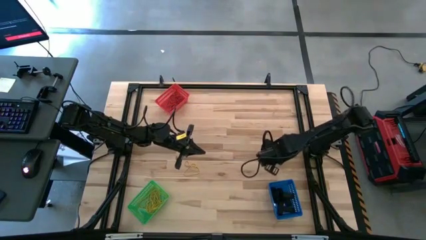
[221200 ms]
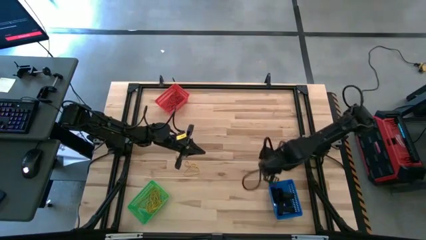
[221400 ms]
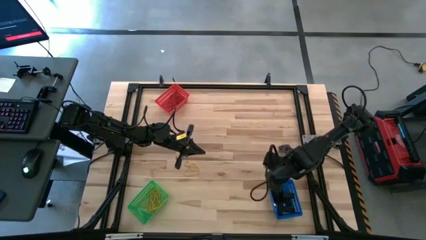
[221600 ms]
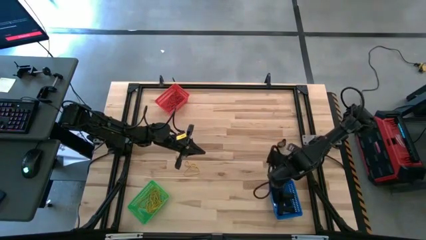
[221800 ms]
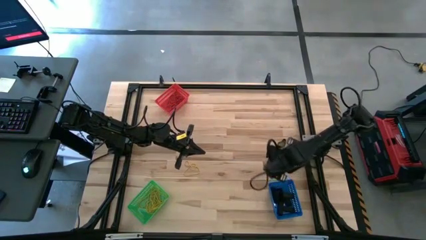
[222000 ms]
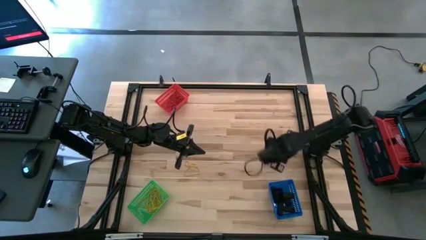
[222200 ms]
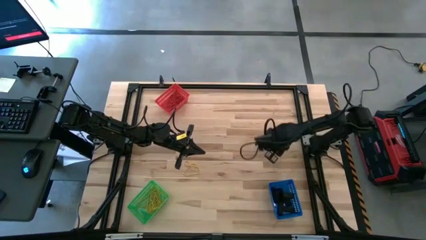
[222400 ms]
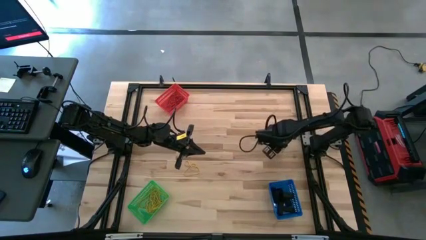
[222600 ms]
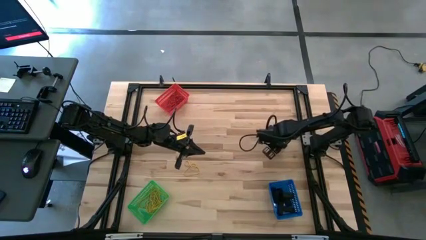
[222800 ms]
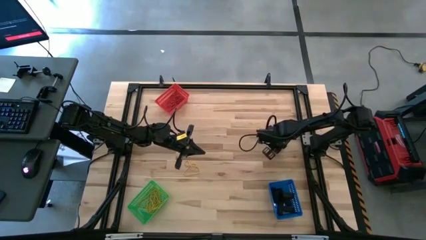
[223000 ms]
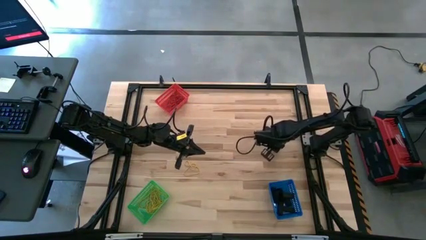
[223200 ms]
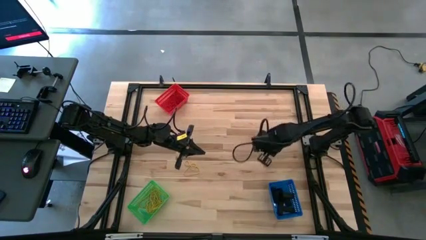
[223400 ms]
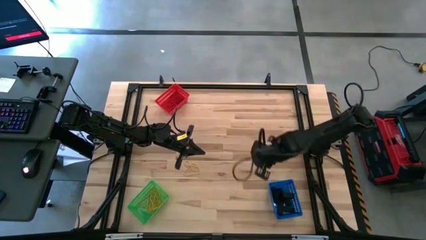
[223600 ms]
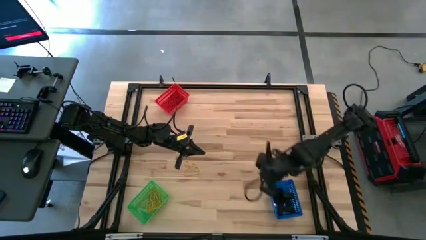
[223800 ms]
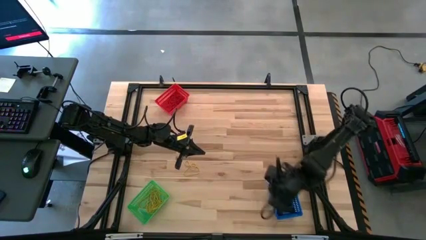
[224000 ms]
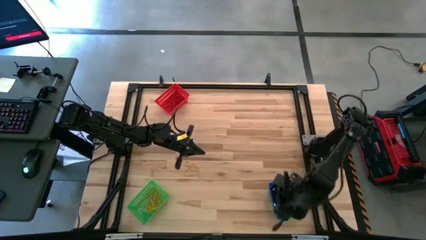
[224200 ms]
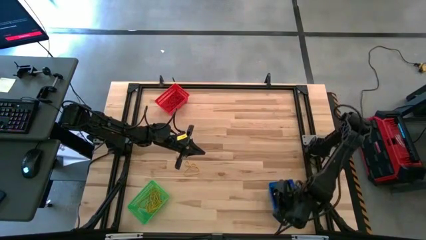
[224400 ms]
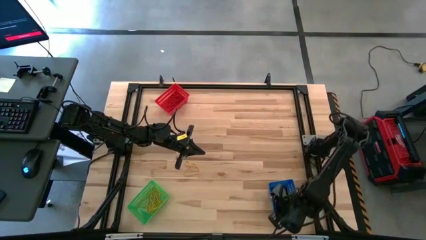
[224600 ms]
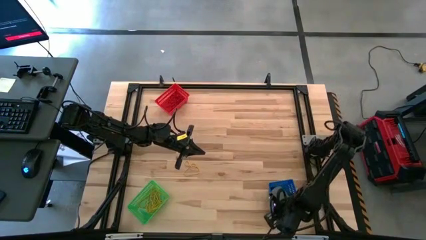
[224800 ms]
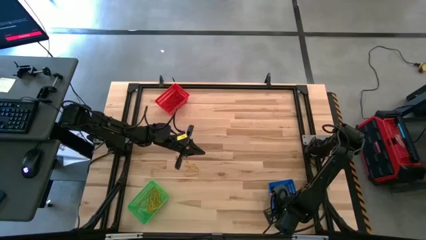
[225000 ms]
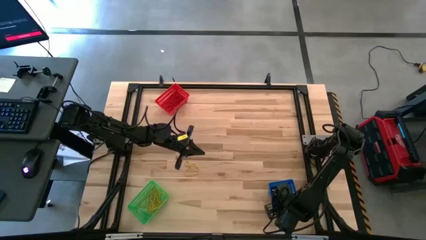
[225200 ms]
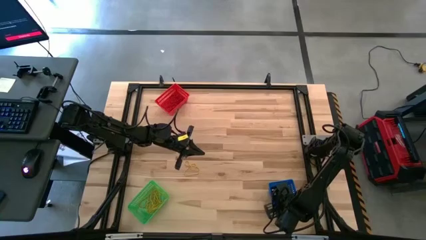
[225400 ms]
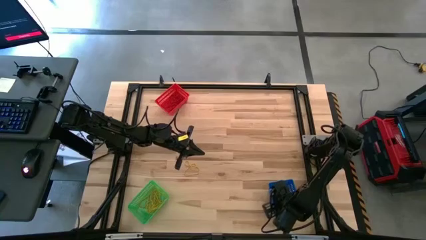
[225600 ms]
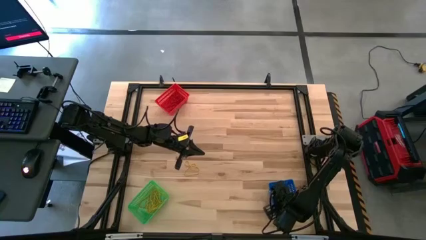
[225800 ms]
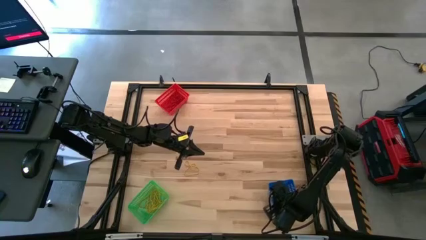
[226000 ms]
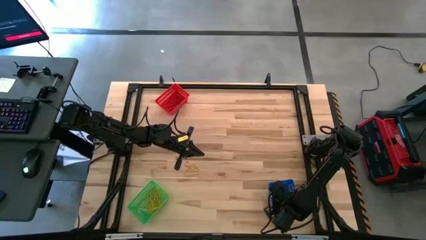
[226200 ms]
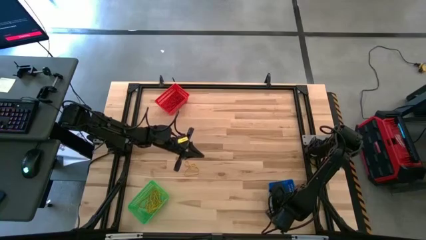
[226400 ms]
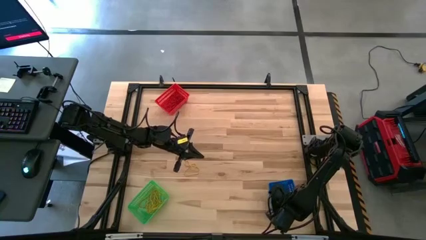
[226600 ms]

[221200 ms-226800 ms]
Task: Sort rubber bands into baskets
Put the black rubber band into the blue basket

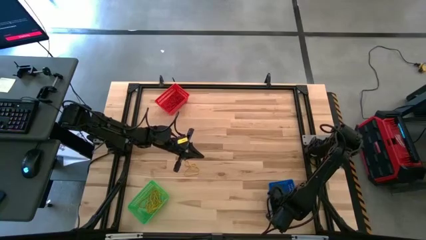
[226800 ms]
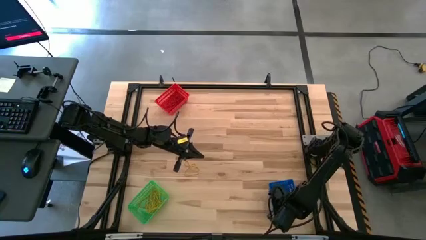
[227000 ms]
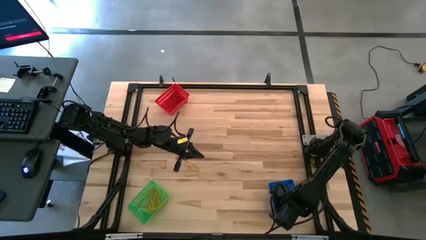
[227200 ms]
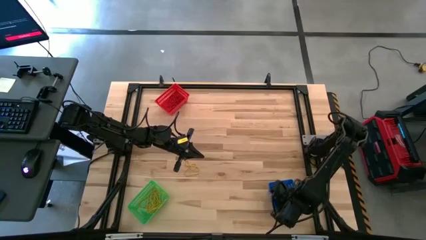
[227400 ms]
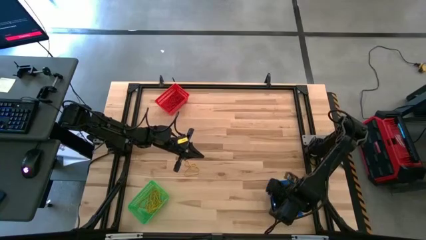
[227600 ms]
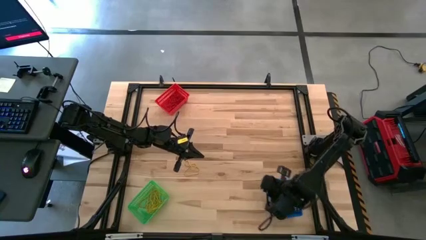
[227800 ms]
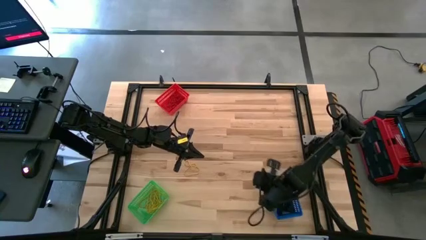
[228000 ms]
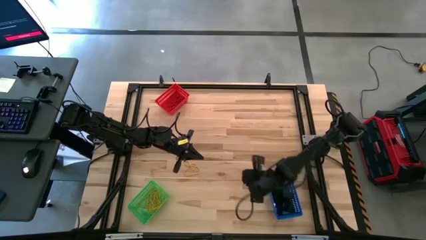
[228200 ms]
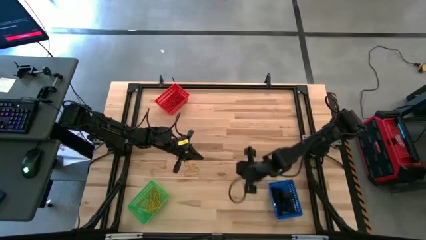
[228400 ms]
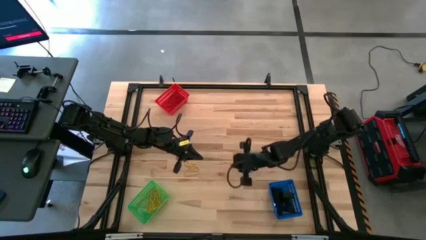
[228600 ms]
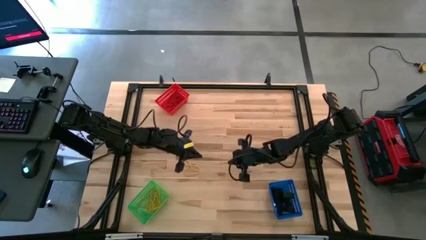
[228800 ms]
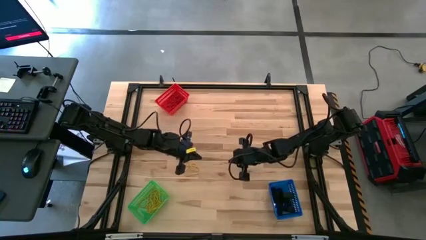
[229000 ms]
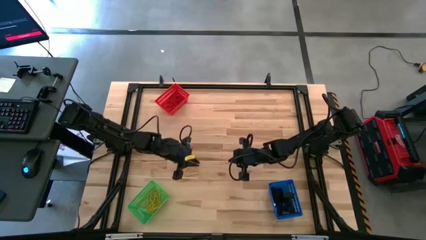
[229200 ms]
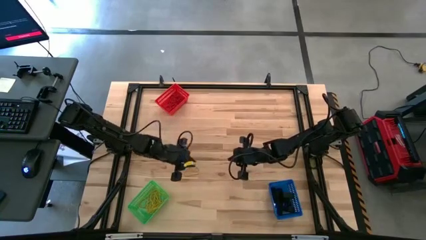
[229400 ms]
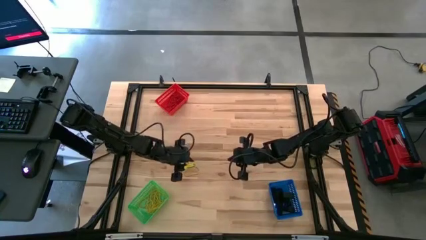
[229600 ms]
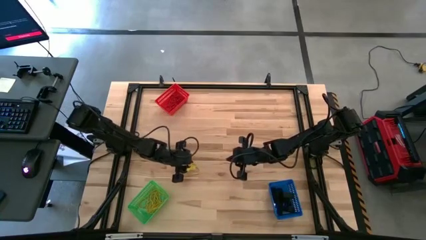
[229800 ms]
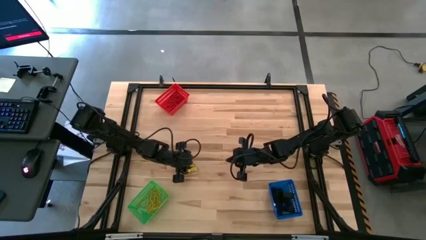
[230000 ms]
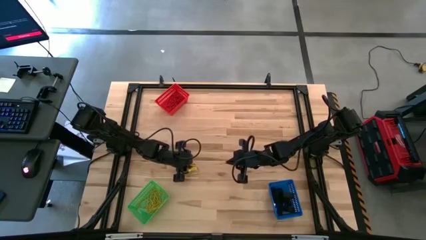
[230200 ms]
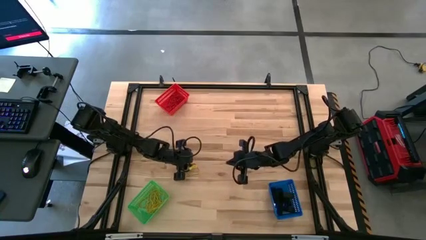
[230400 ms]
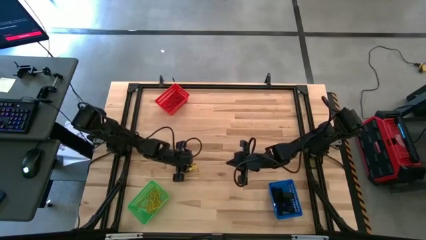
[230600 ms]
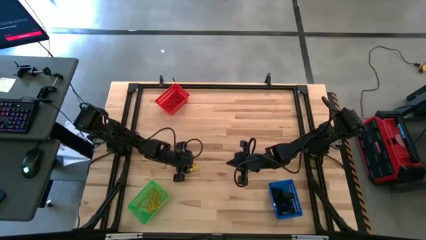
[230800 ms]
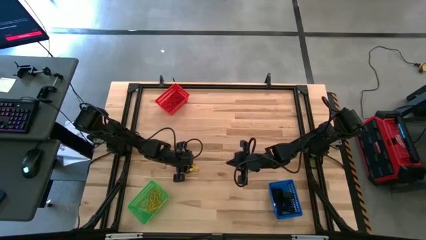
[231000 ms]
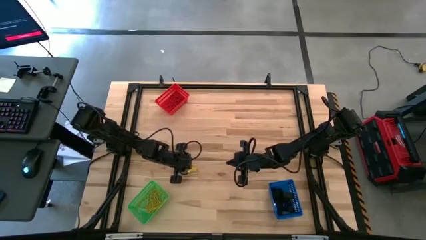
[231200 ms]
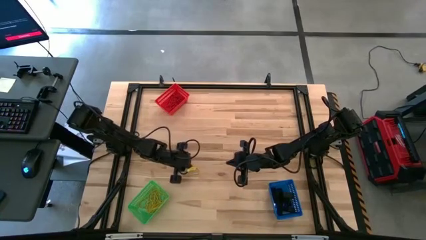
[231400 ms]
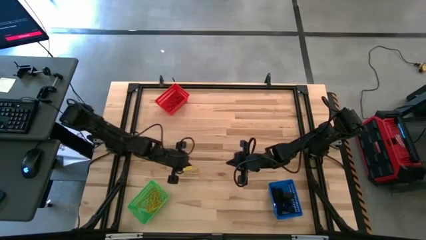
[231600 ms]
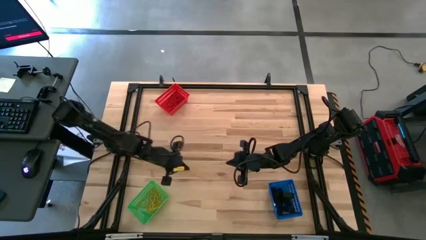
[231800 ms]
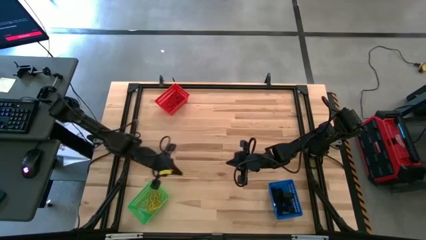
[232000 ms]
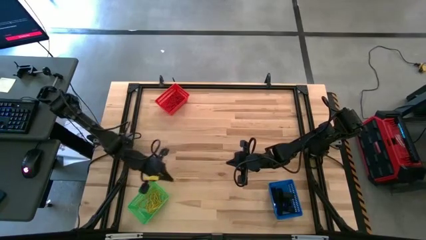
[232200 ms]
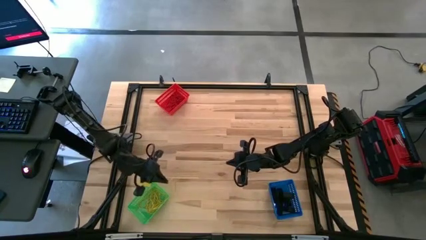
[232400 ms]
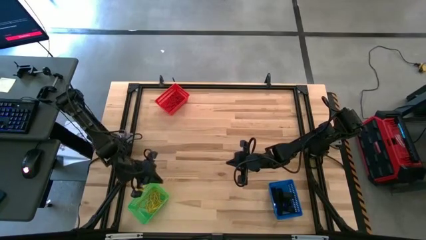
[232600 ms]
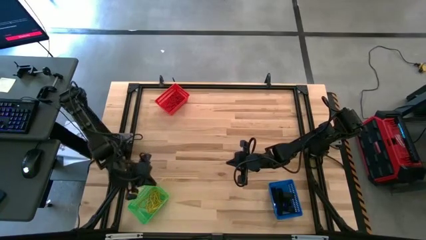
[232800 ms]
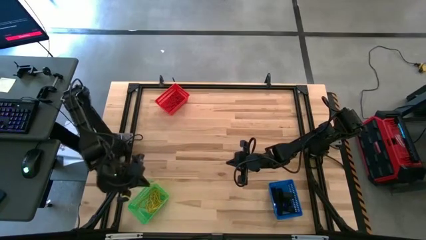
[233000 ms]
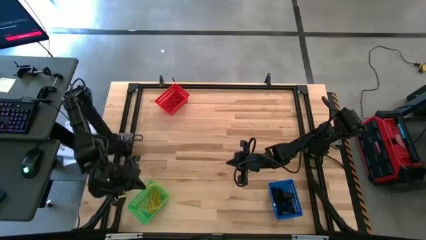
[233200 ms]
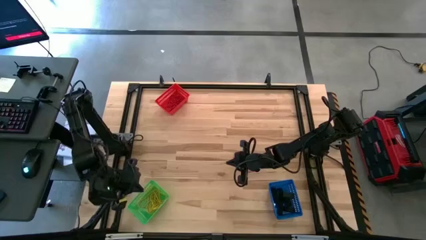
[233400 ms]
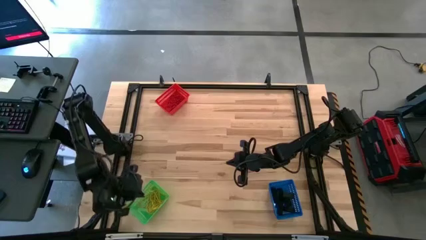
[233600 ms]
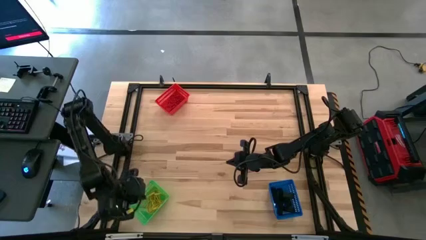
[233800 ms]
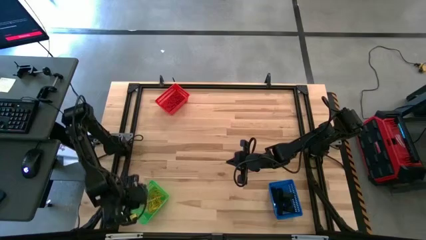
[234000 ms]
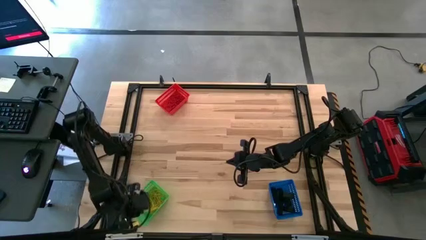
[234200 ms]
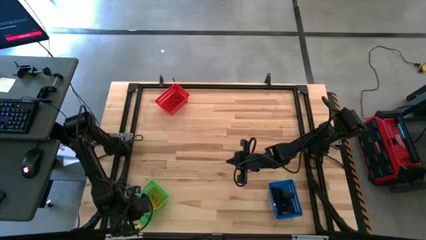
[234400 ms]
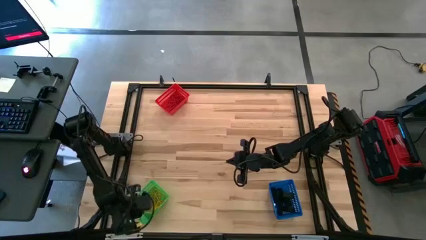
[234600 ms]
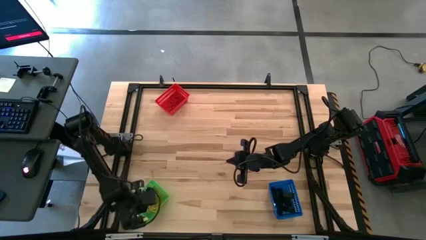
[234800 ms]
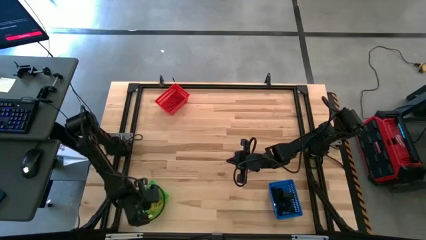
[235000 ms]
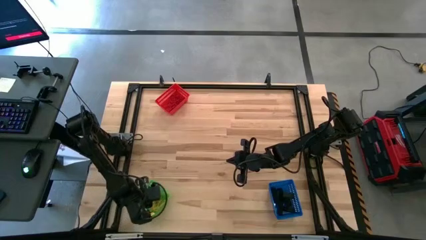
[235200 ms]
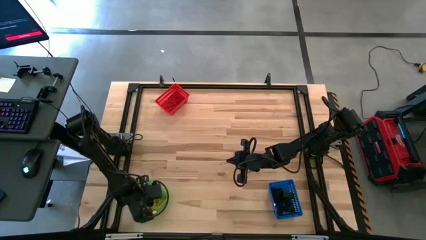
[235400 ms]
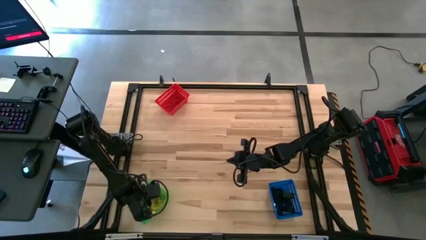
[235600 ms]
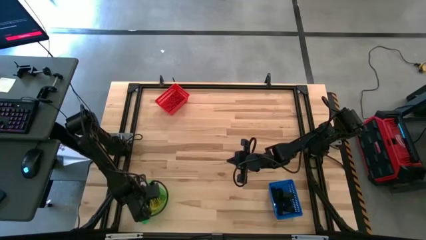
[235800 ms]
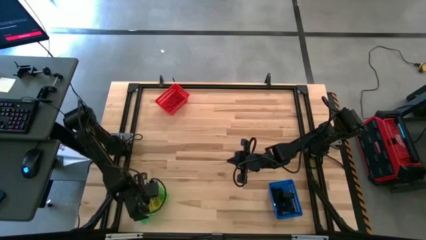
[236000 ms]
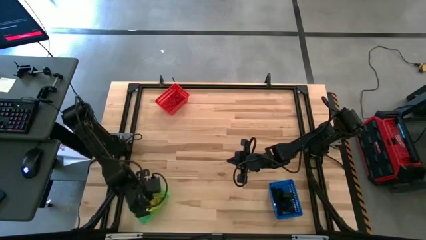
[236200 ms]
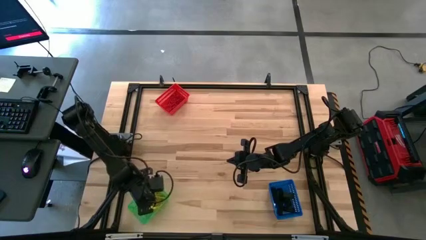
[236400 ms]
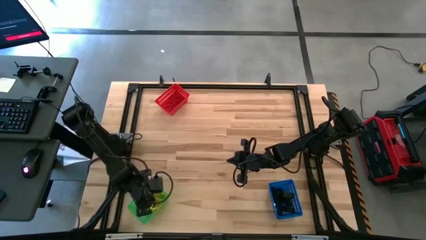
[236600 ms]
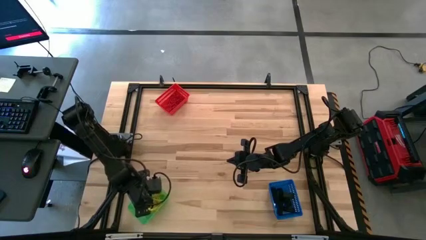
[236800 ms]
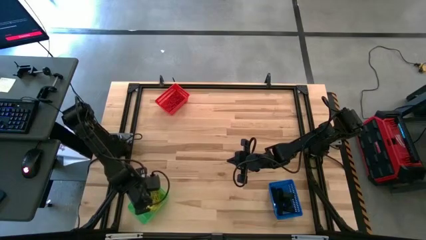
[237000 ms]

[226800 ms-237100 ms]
Put the yellow rubber band into the green basket
